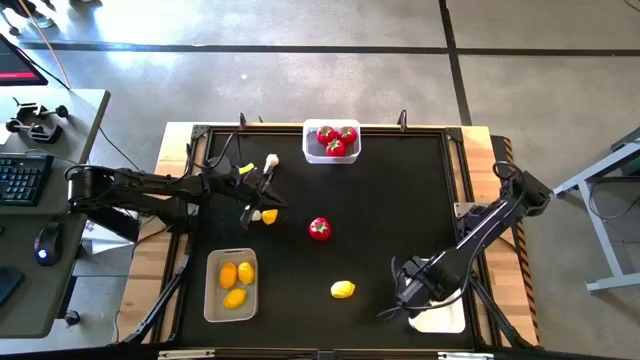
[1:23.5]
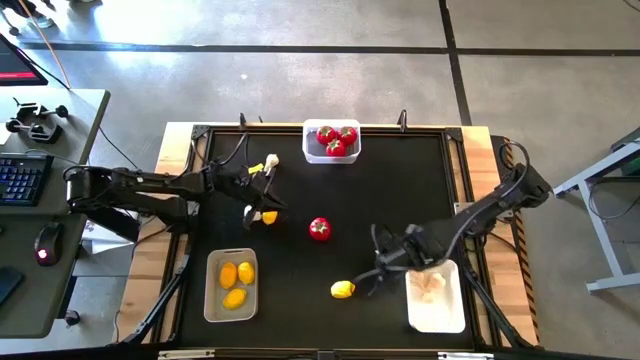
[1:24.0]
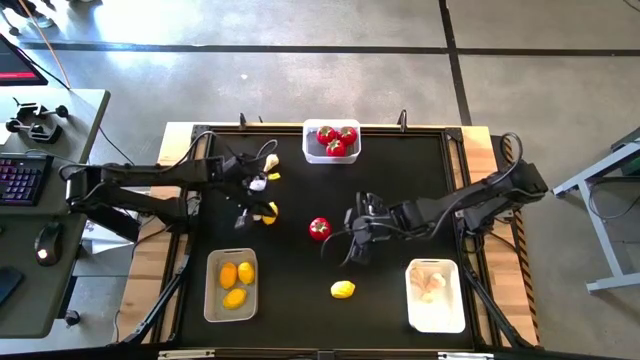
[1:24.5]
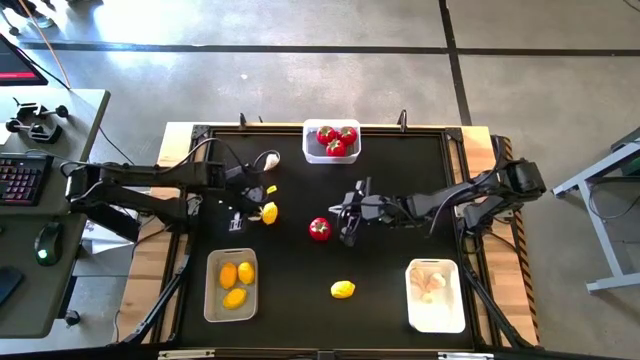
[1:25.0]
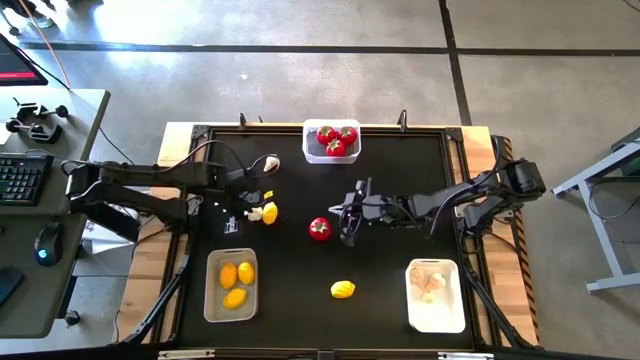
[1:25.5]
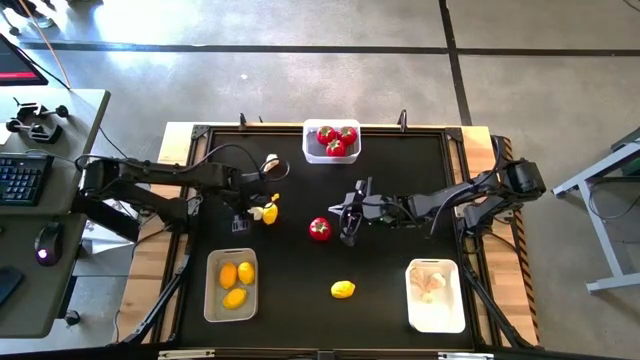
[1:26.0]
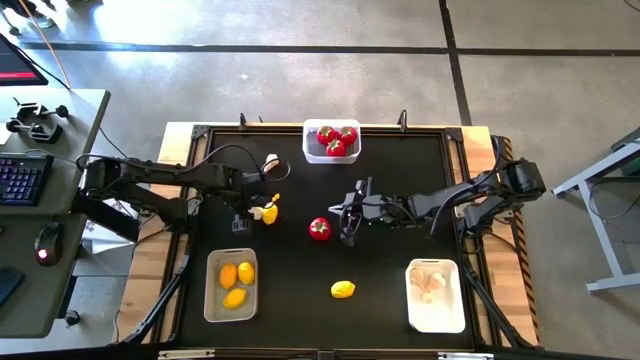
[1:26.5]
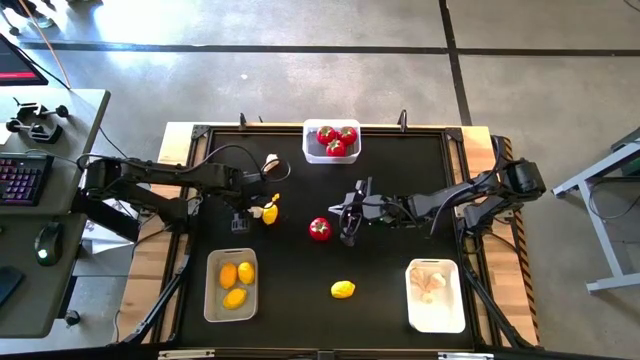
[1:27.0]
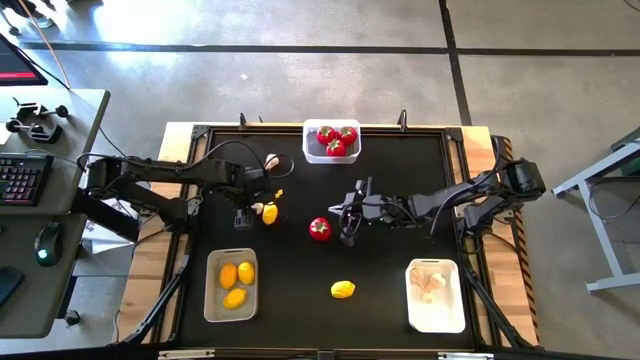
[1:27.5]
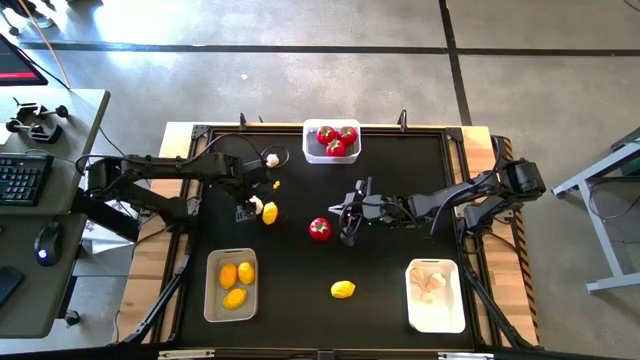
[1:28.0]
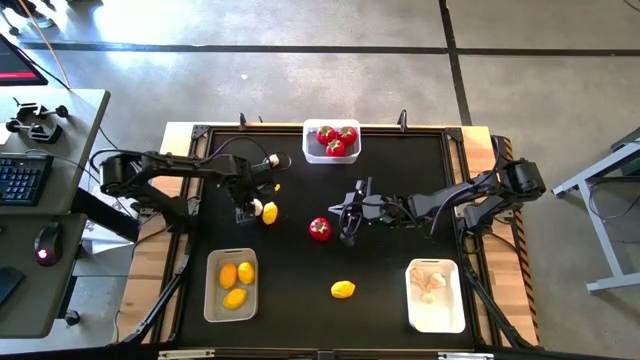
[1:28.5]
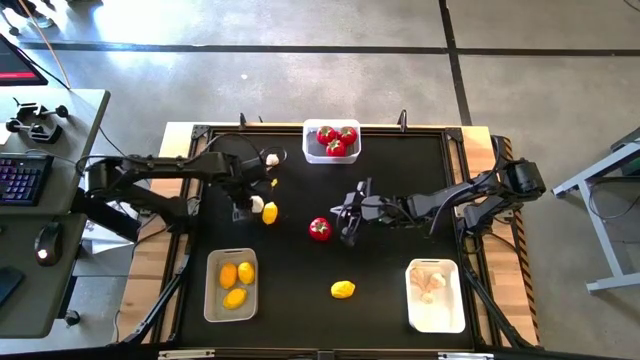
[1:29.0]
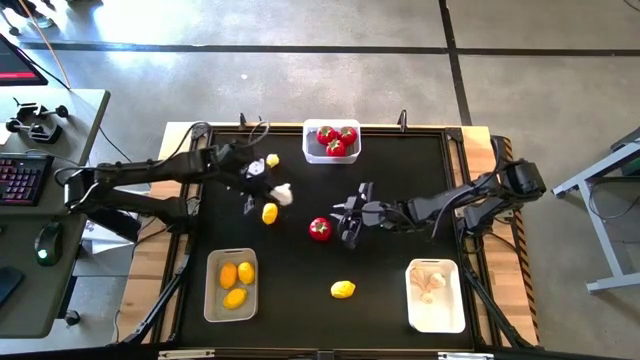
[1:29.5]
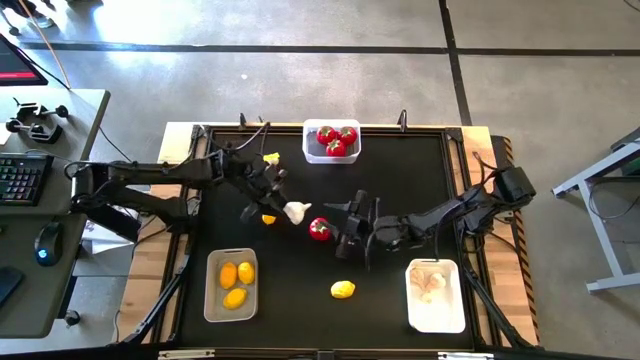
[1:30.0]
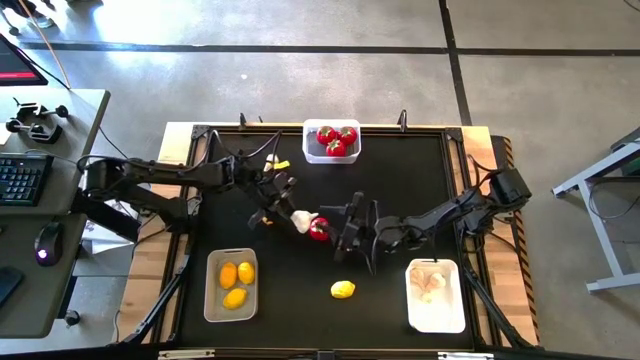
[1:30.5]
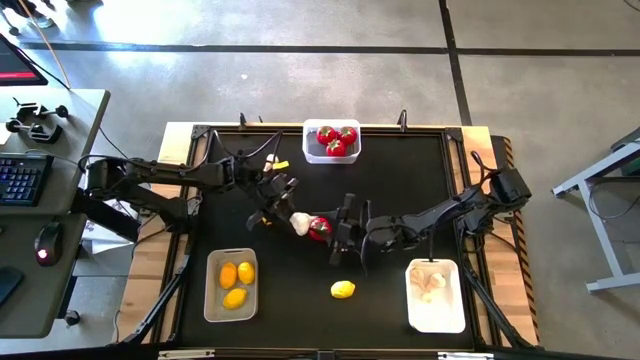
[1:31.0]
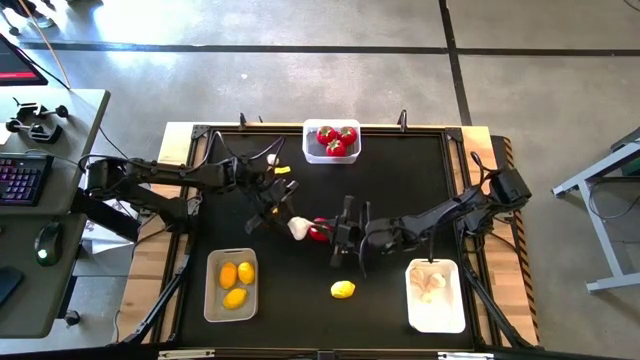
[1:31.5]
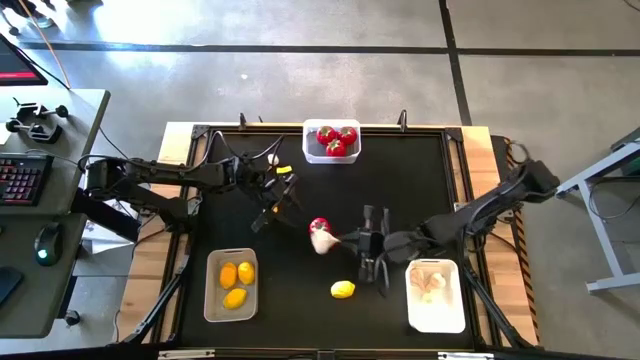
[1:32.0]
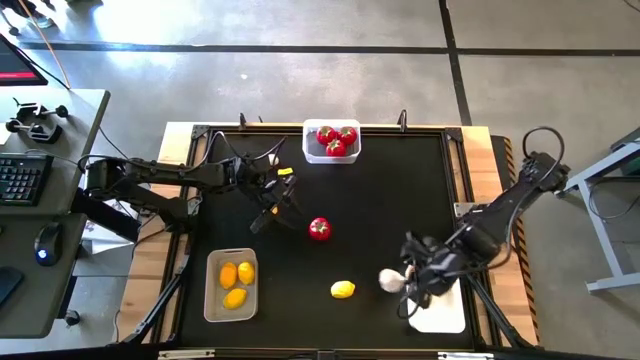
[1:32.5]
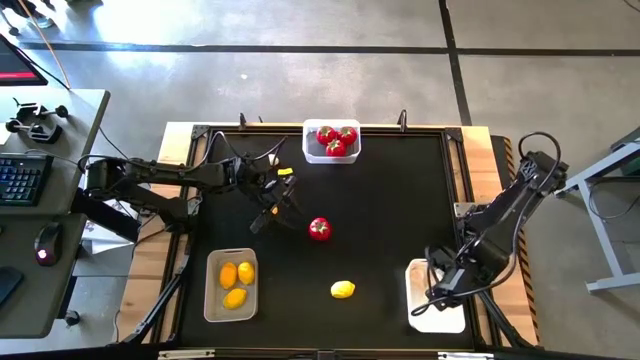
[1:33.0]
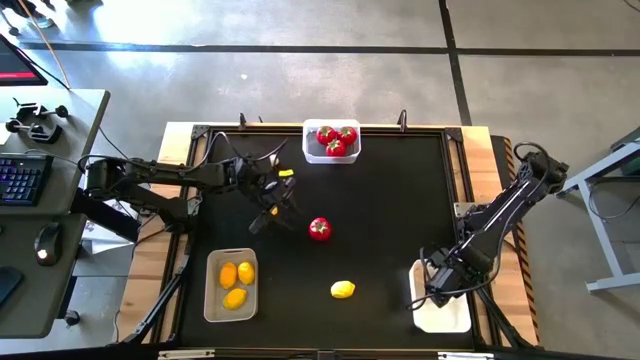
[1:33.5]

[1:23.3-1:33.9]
Task: Sort produce into baskets
Put the white garlic into the white bin

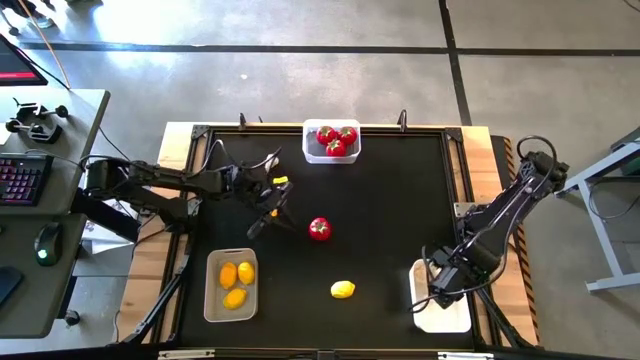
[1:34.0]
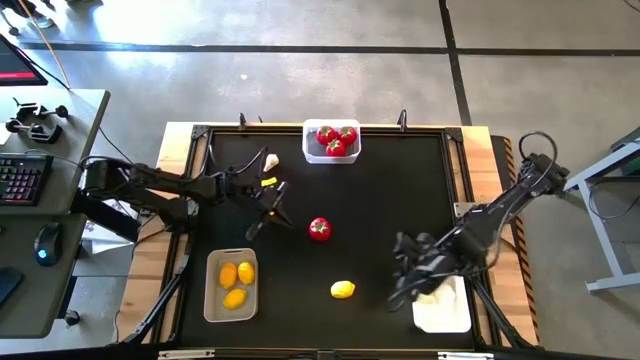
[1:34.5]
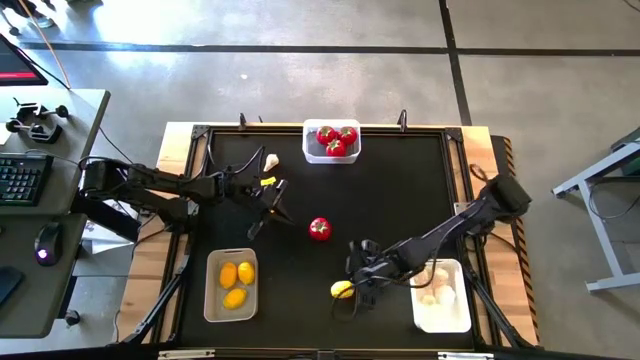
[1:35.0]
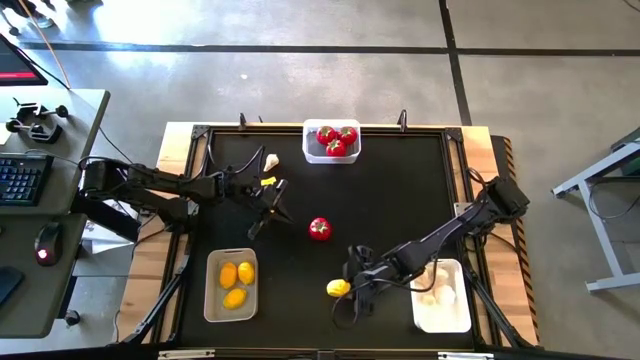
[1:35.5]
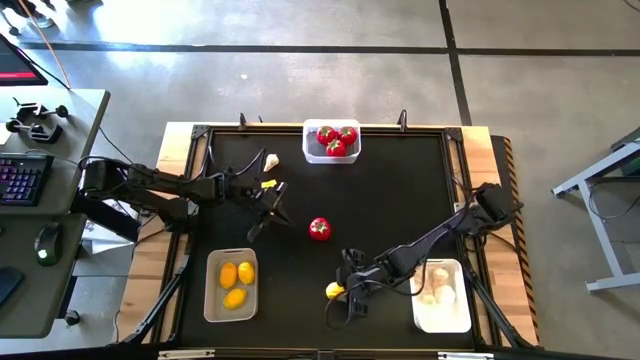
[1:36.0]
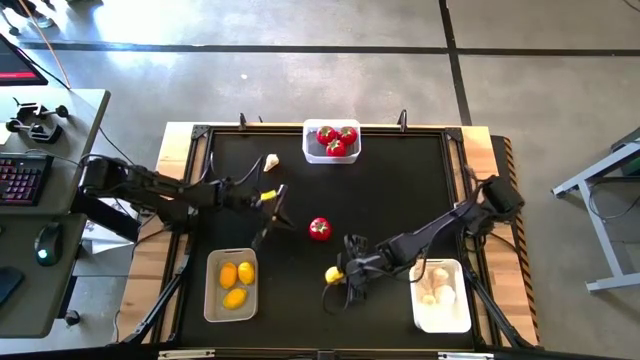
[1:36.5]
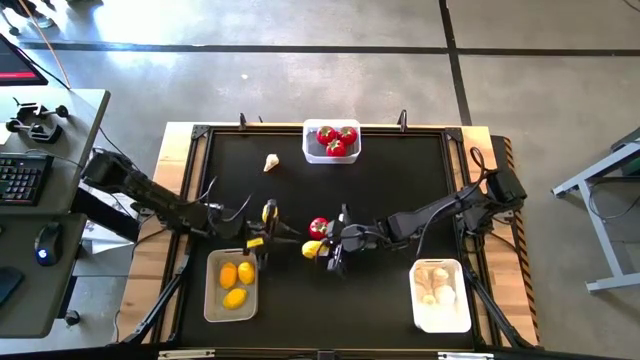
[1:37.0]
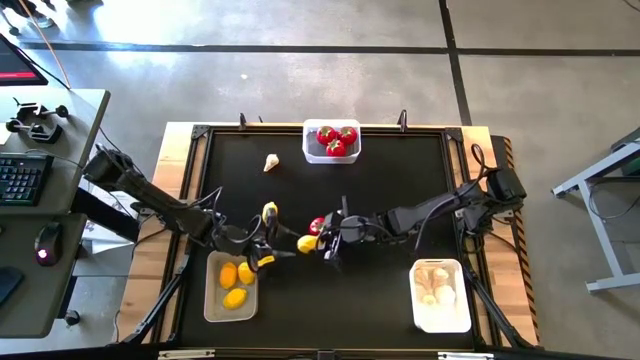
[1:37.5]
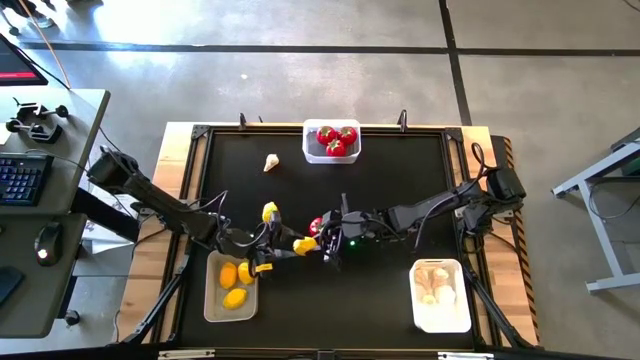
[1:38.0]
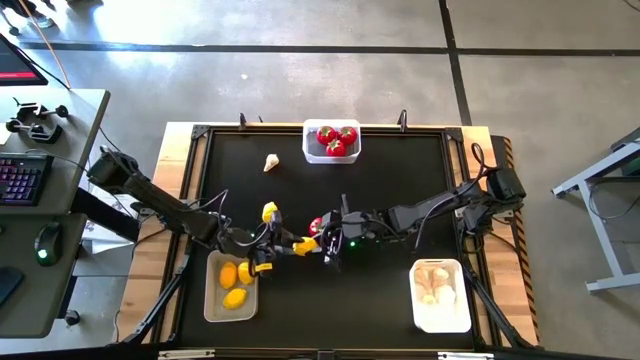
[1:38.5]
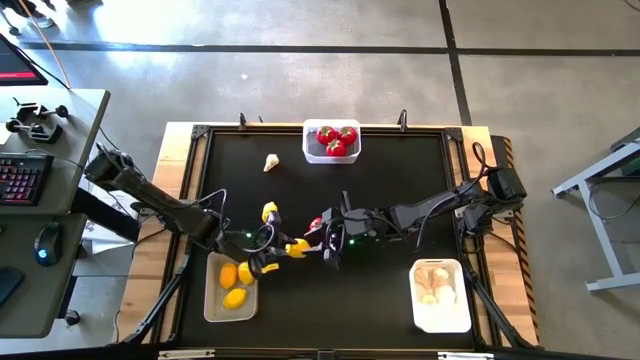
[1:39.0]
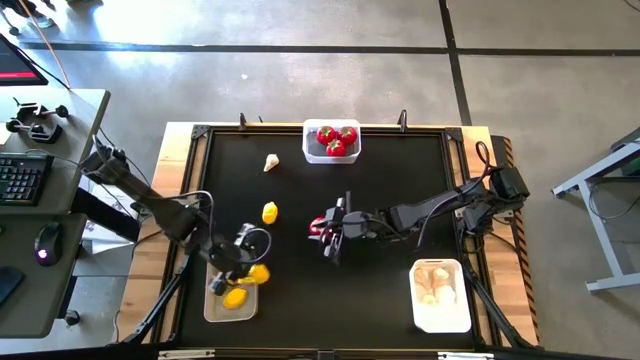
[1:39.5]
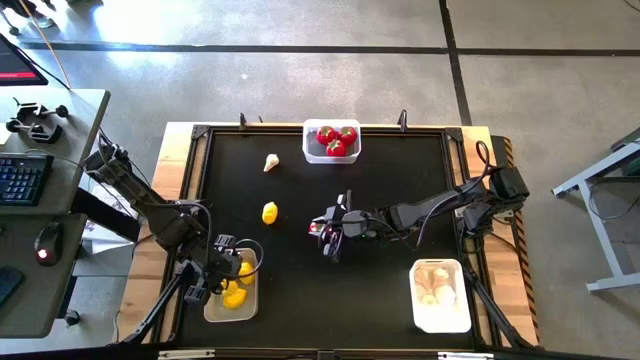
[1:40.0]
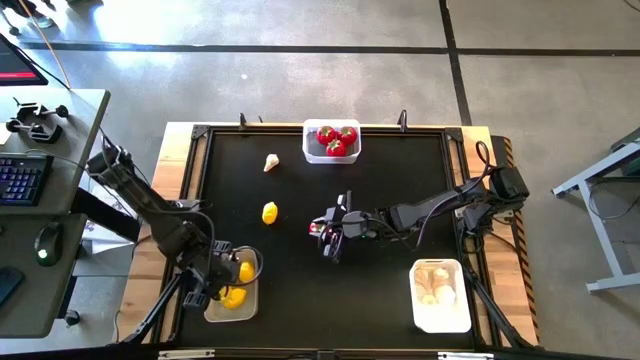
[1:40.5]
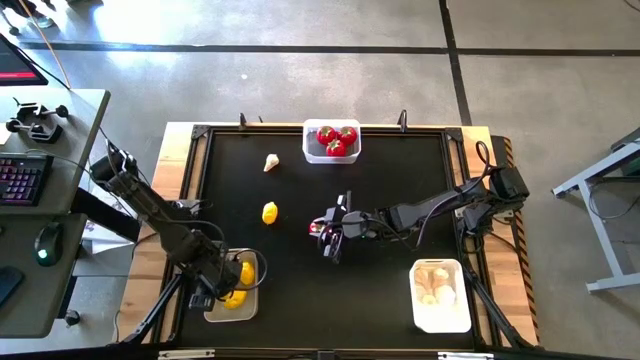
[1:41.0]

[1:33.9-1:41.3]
Put the yellow lemon into the gray bin

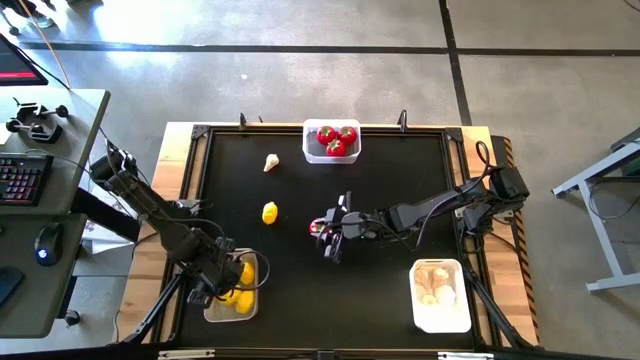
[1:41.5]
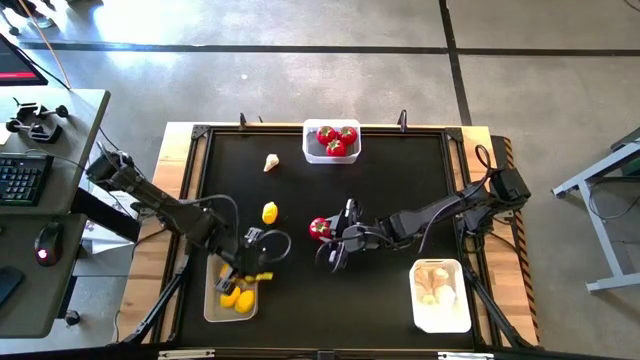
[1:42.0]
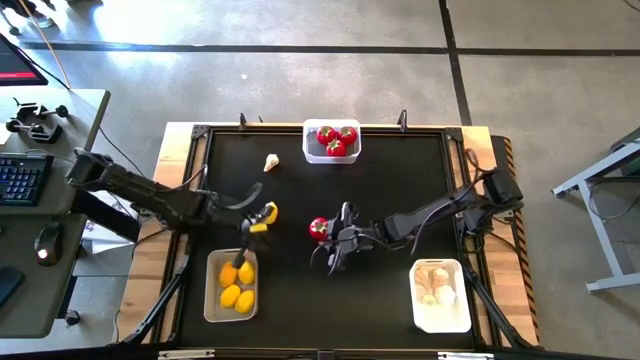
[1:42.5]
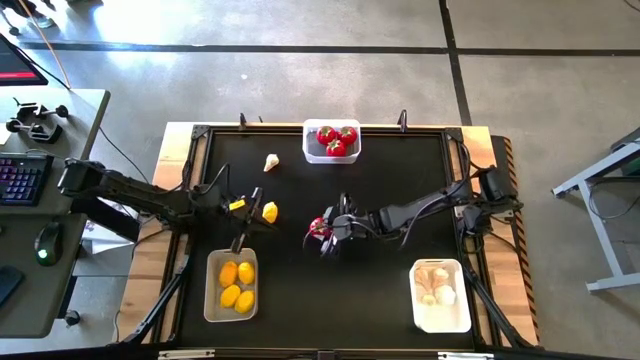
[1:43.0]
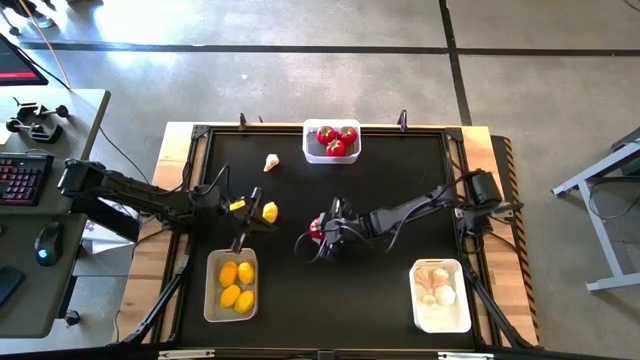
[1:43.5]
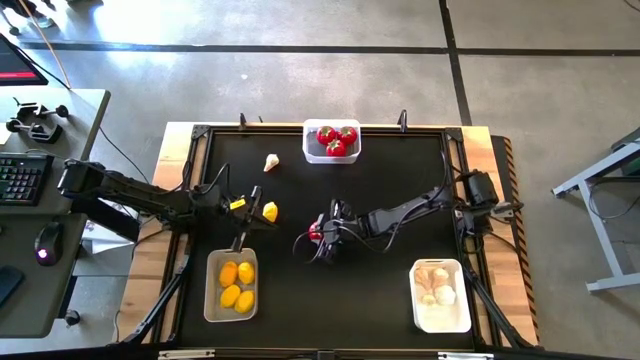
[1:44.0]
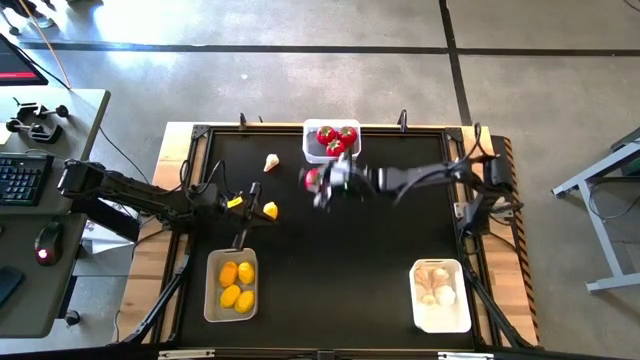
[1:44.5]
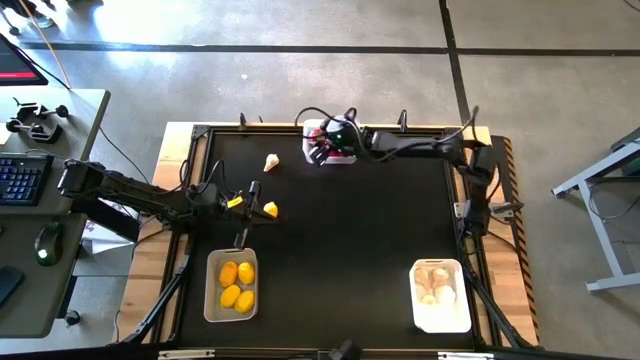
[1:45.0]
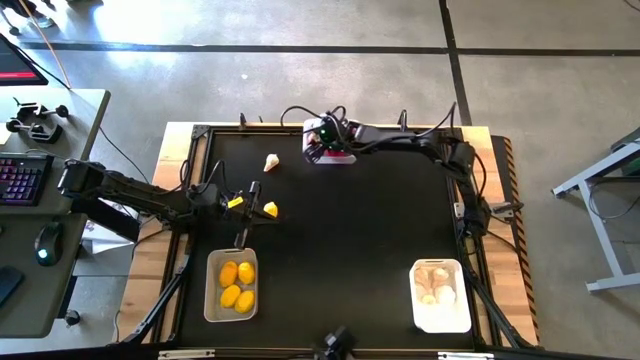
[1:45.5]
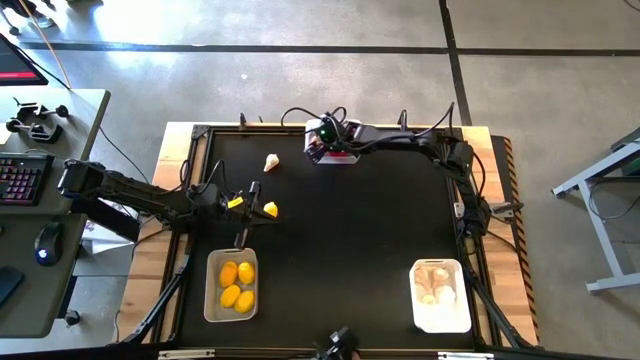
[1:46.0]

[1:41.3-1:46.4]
Put the red tomato into the transparent bin
